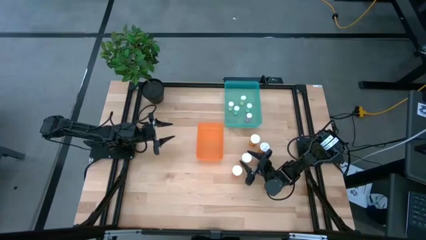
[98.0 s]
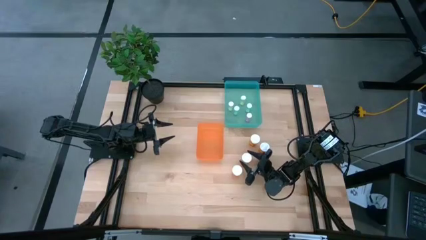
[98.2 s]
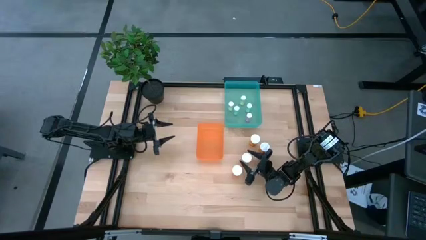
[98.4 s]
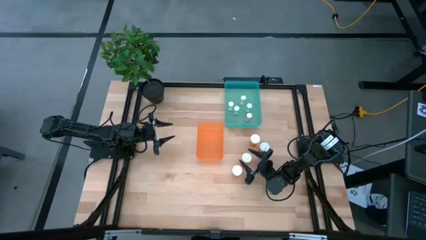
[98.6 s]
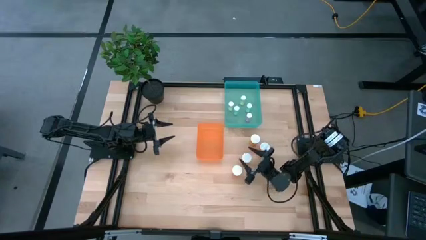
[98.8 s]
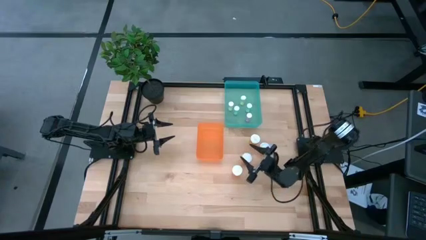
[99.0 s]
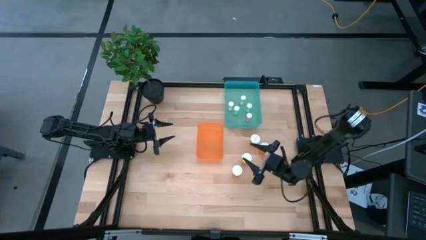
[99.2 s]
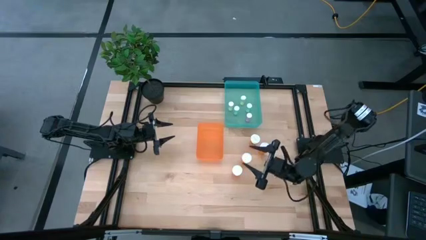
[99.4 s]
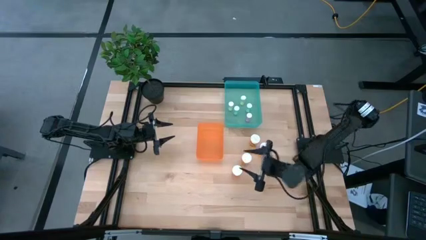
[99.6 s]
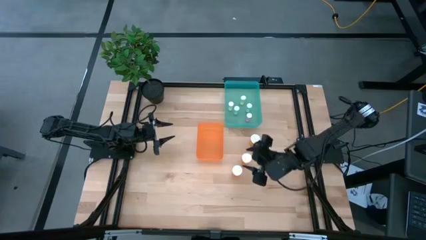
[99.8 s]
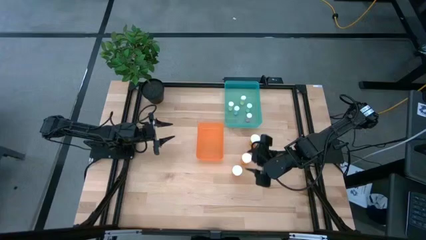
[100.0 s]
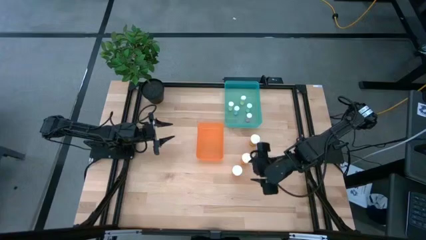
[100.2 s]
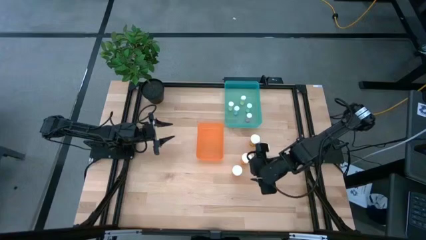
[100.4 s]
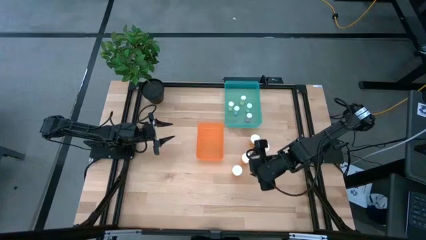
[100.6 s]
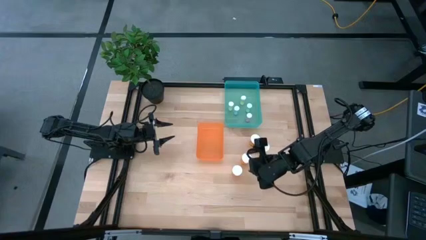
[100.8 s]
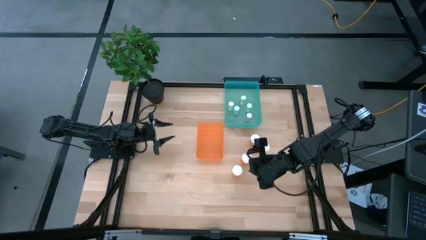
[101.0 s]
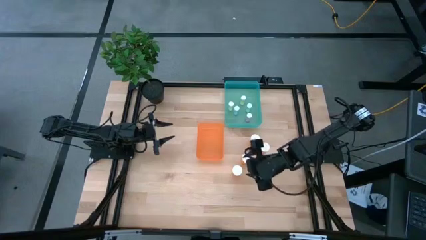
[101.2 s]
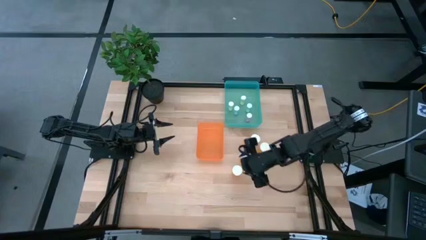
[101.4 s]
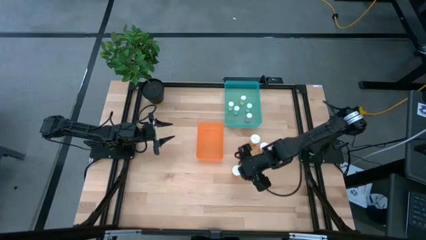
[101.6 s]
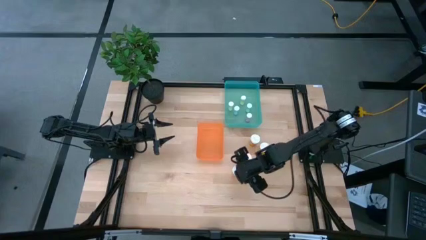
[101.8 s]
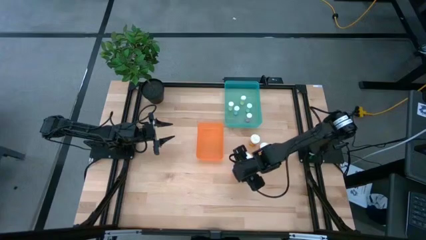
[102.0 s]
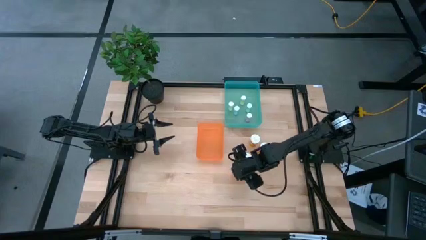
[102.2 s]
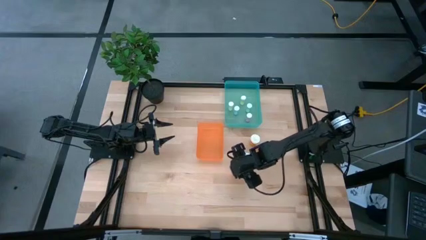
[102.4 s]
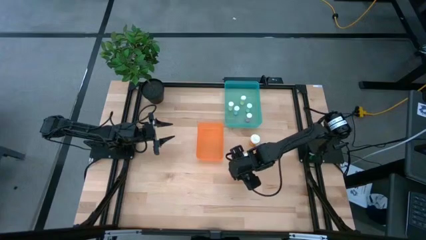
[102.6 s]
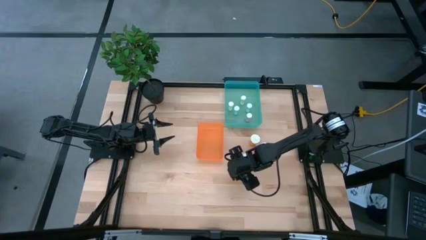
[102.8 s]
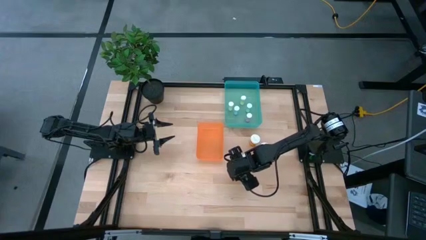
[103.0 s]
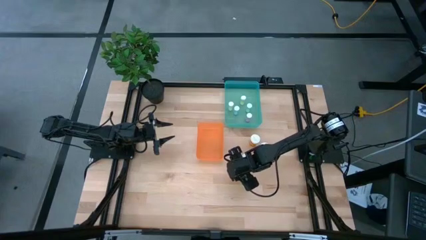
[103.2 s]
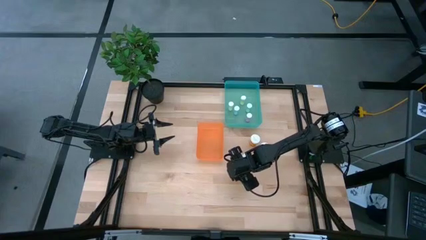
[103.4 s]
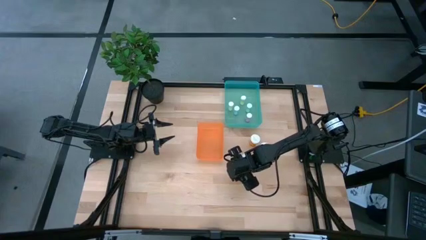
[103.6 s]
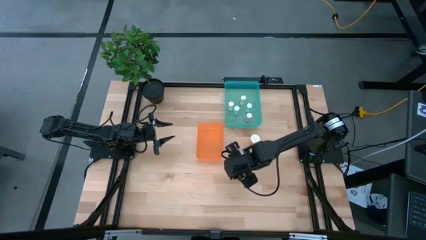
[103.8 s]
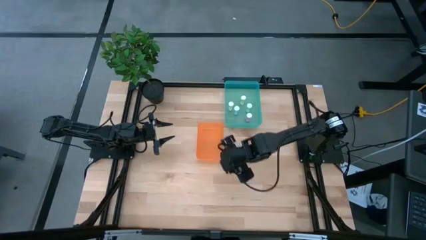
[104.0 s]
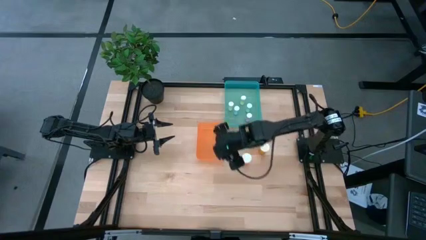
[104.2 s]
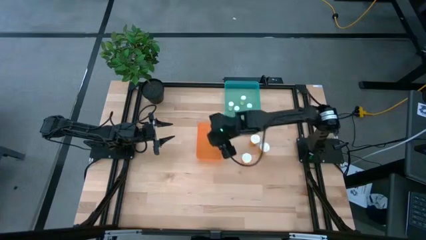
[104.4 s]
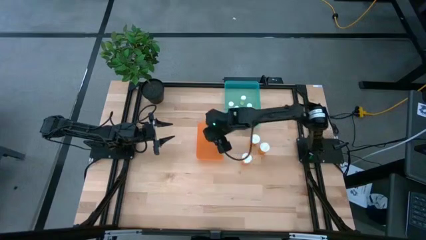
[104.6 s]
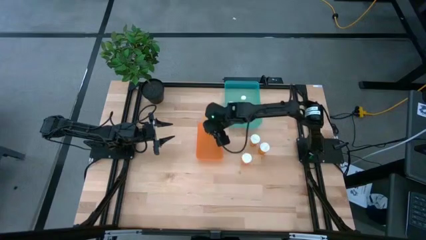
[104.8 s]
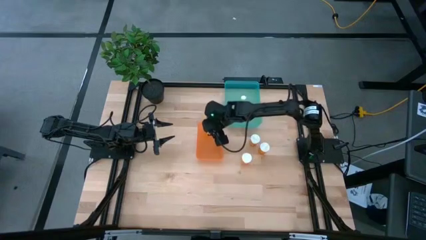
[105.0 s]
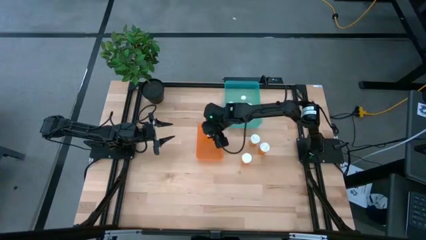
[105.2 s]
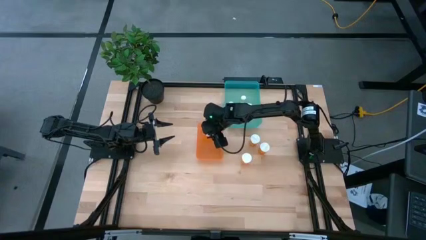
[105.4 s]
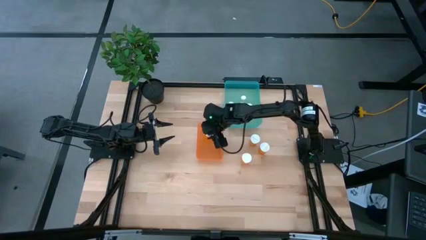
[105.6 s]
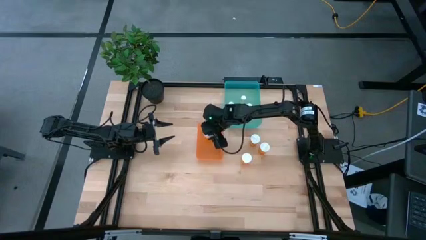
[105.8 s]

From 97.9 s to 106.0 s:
Task: Pick and place medicine bottles into bin by pill shape (circle, oval)
Put the orange capsule bottle into the orange bin

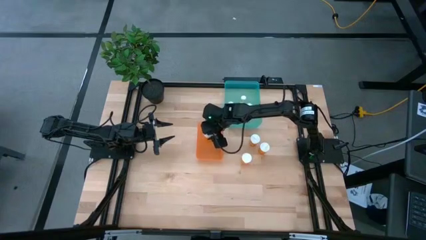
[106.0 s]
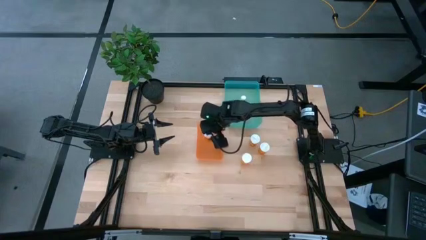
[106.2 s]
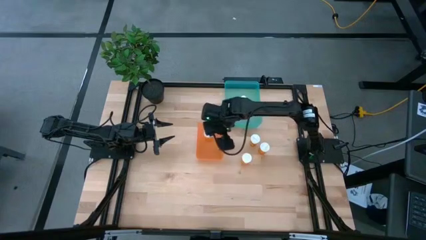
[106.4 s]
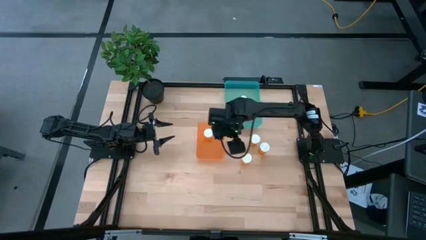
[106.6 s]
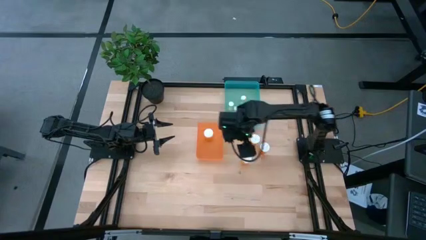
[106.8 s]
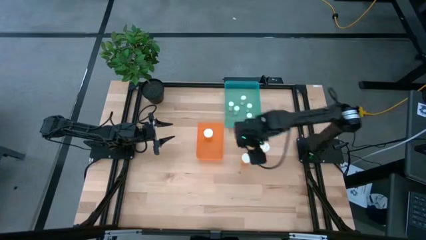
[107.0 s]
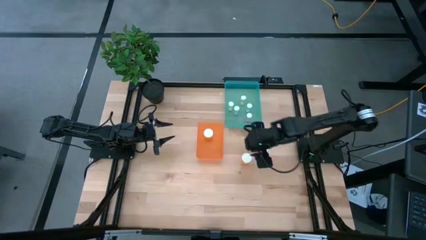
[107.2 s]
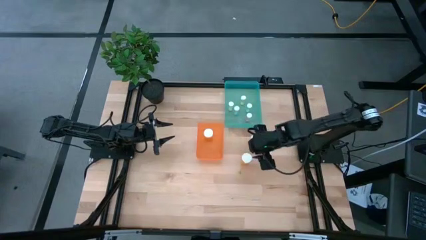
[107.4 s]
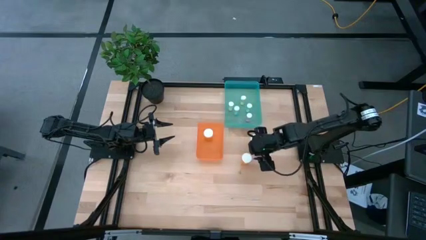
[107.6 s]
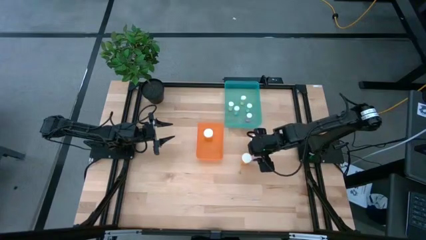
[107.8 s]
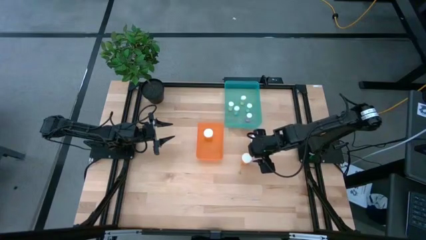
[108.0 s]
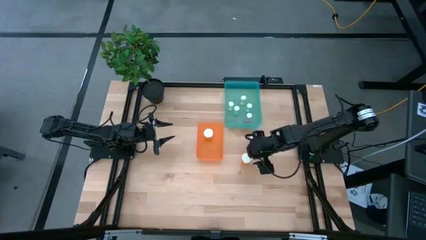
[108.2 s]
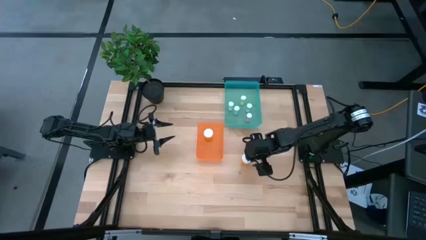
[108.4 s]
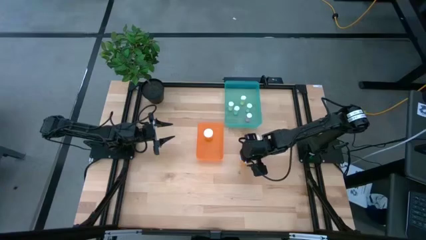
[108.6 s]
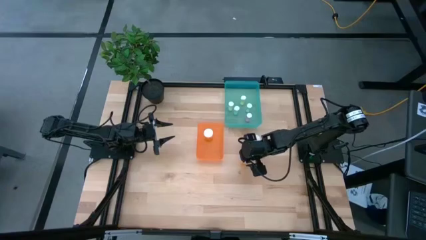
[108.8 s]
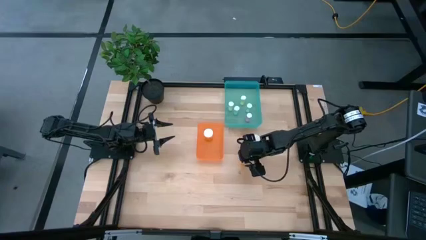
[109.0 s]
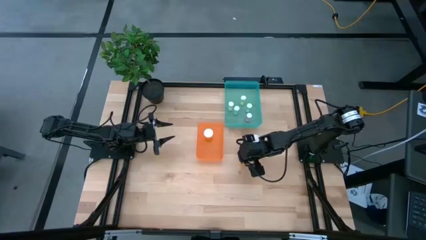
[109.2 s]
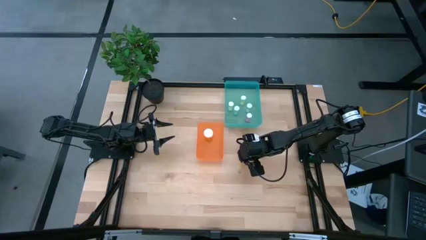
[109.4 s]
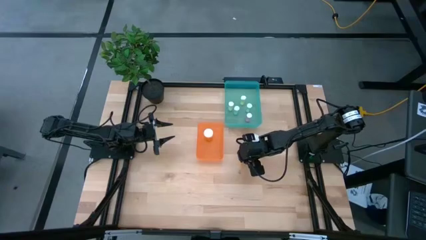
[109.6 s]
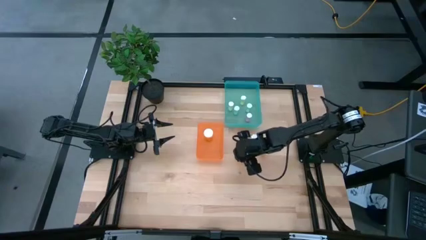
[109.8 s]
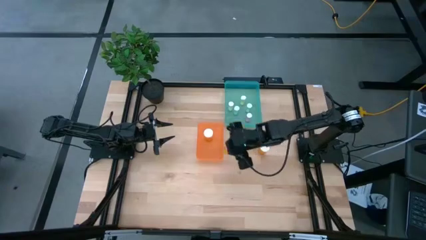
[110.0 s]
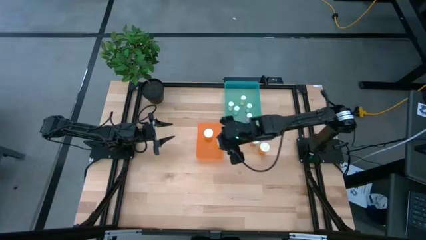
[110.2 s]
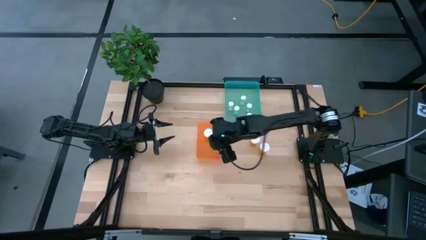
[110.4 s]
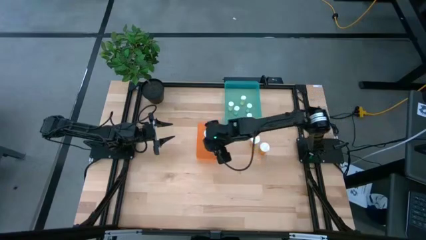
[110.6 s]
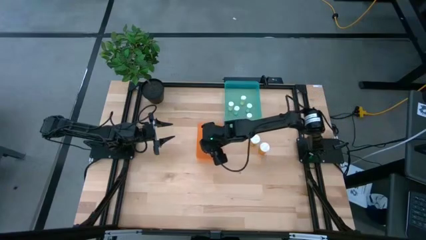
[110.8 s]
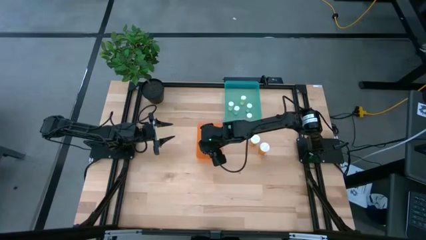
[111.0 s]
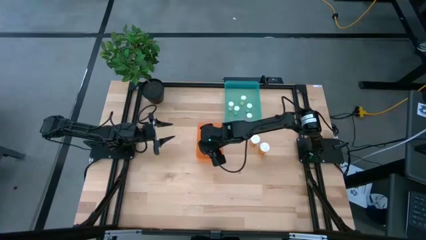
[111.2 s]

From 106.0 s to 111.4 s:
Put the orange capsule bottle into the orange bin

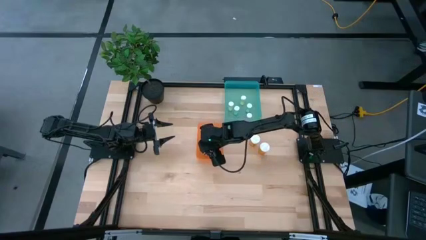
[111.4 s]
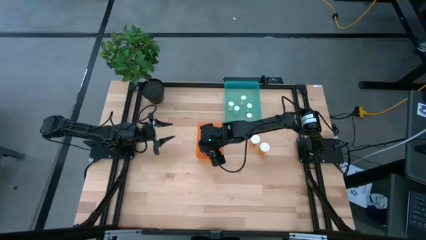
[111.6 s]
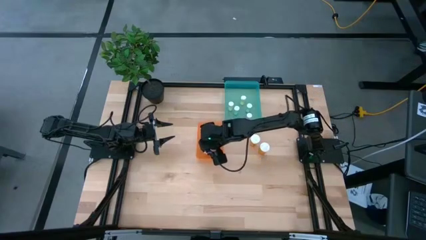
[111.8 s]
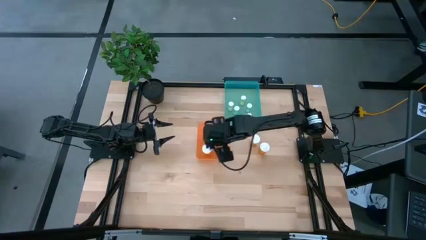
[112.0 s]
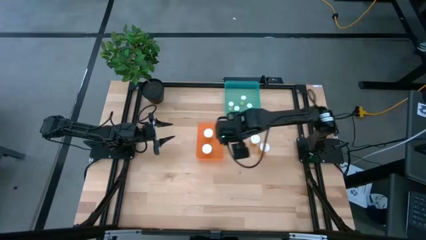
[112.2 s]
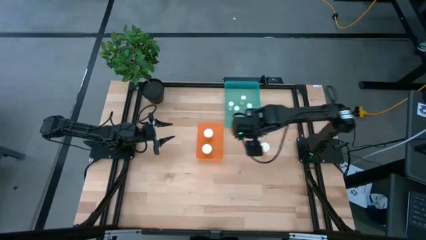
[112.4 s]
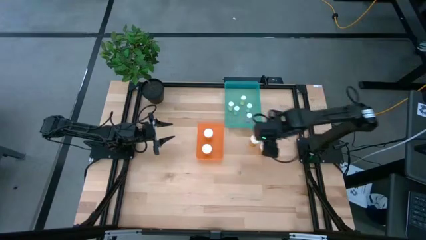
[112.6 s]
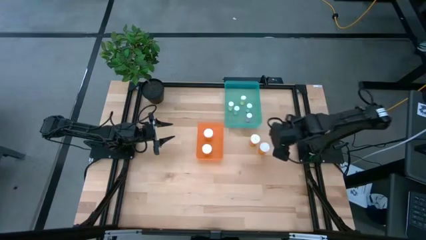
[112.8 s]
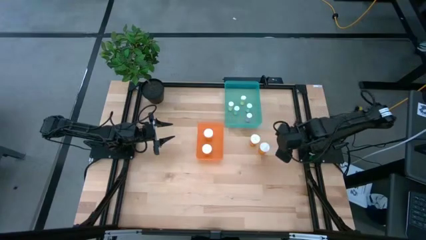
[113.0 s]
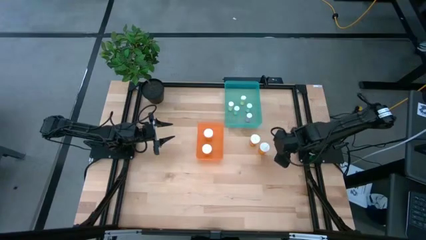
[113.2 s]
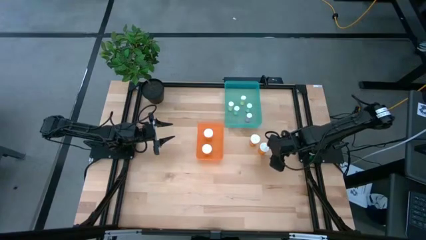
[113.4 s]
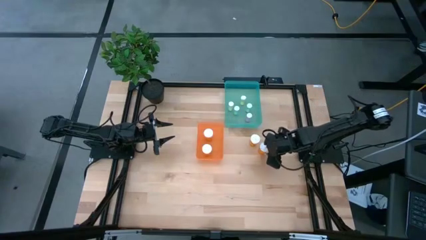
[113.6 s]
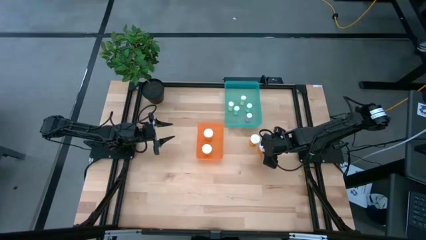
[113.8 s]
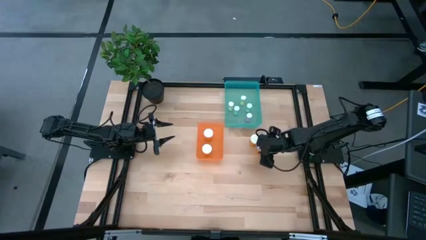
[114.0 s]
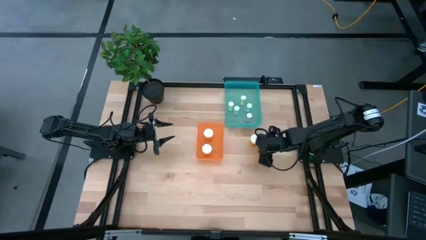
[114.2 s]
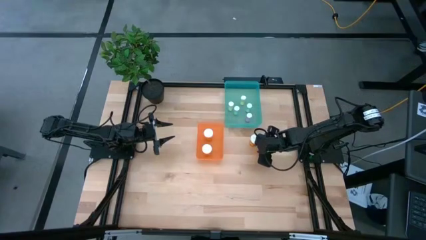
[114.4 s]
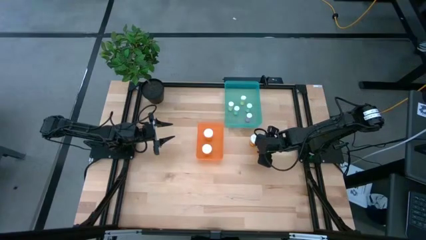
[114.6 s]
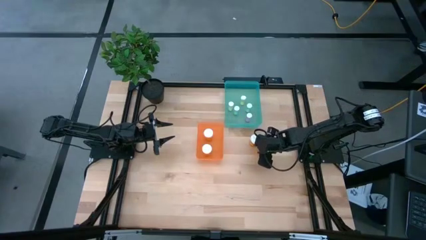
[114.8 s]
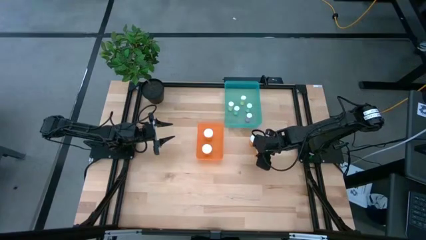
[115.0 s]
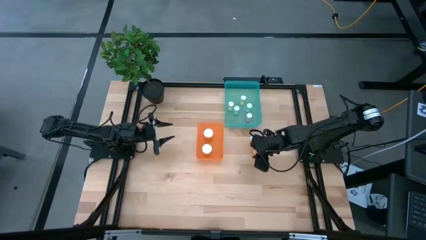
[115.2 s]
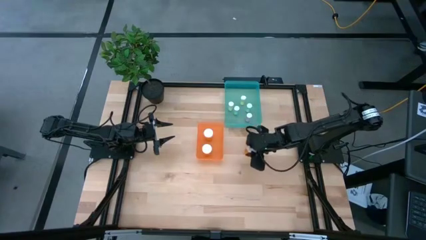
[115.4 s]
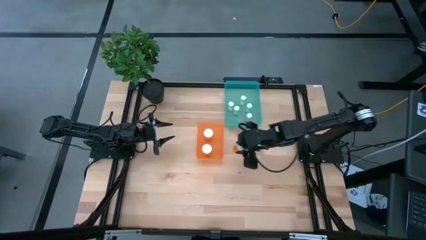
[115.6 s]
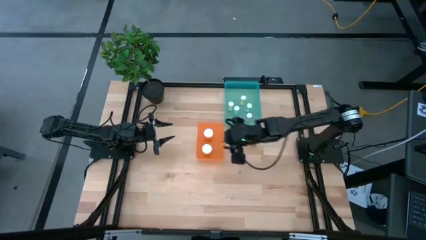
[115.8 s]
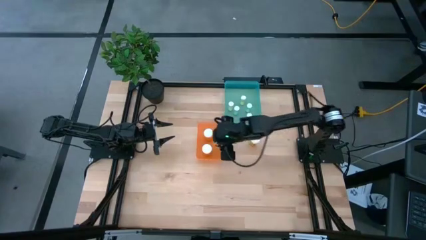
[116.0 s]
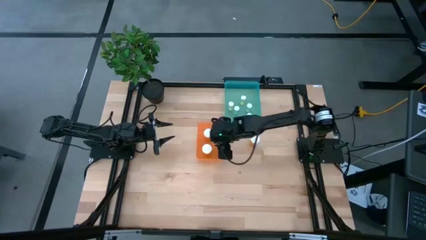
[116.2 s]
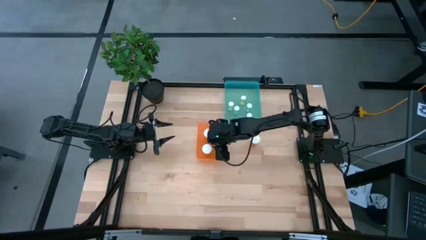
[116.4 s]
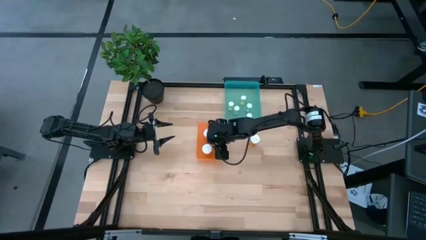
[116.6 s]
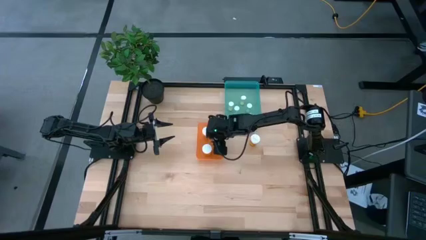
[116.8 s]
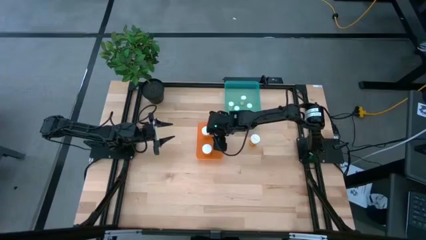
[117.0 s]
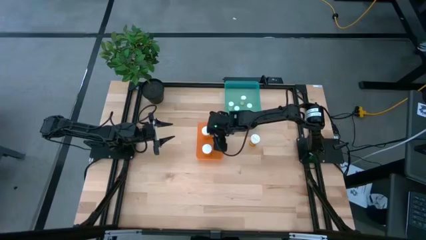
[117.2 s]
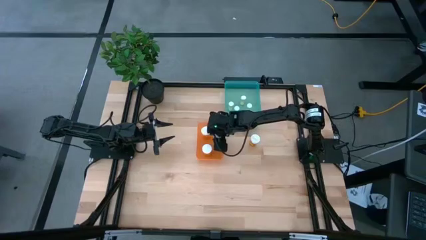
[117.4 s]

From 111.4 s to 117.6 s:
Put the orange capsule bottle into the orange bin
